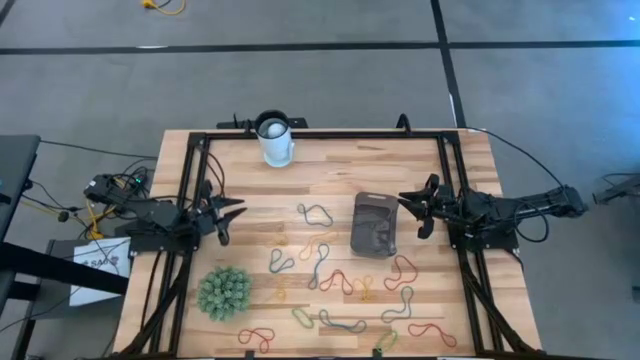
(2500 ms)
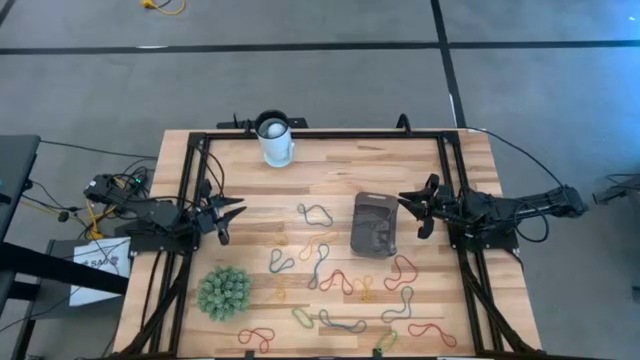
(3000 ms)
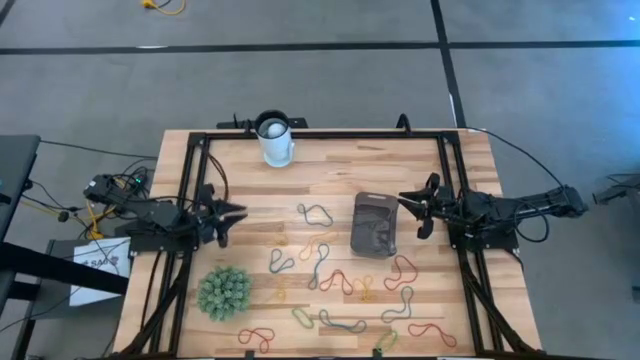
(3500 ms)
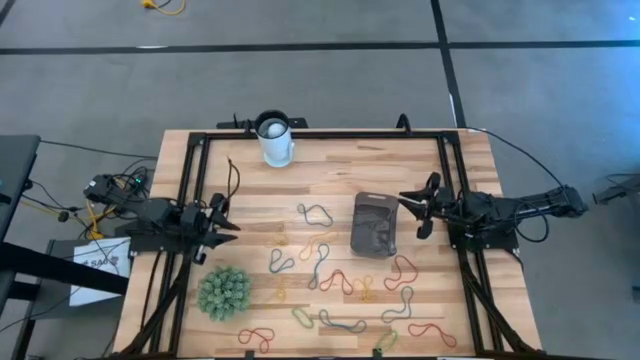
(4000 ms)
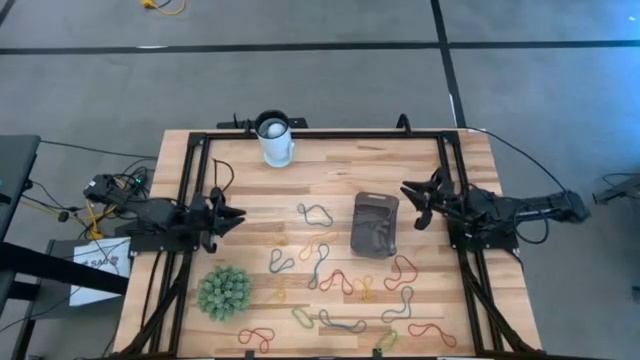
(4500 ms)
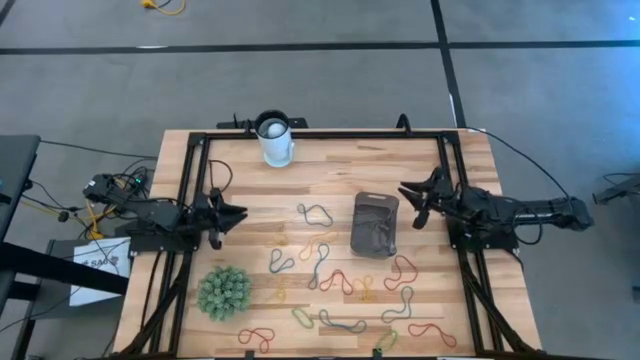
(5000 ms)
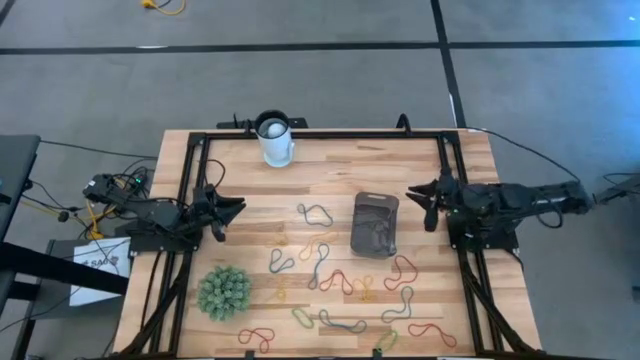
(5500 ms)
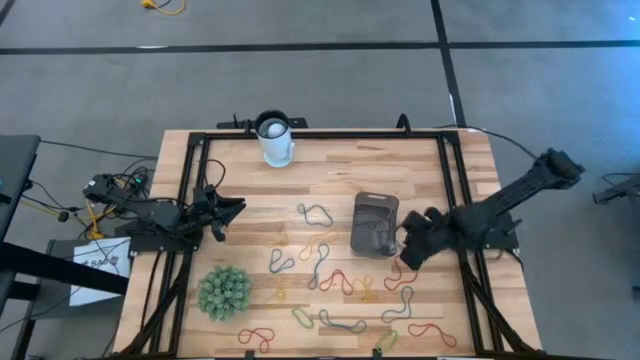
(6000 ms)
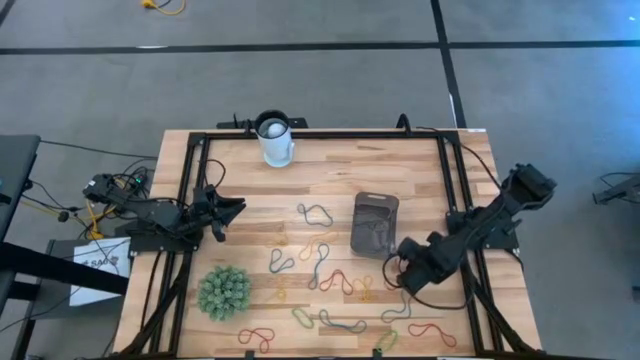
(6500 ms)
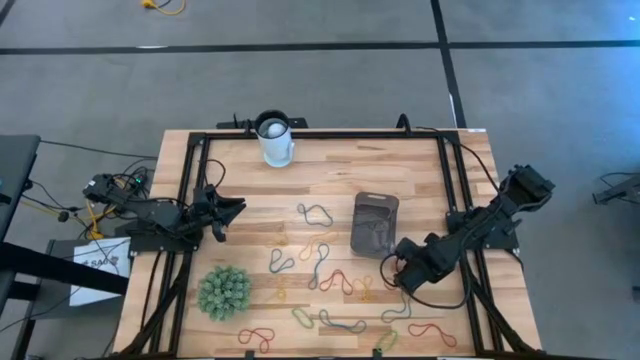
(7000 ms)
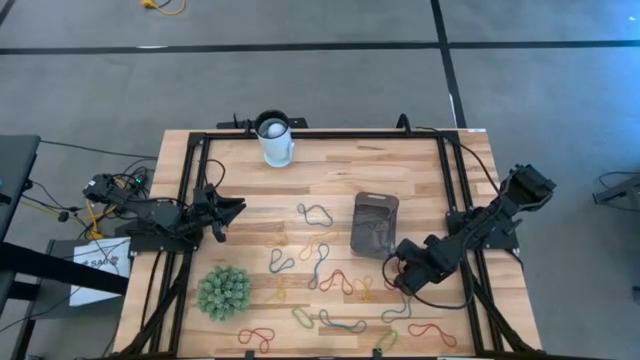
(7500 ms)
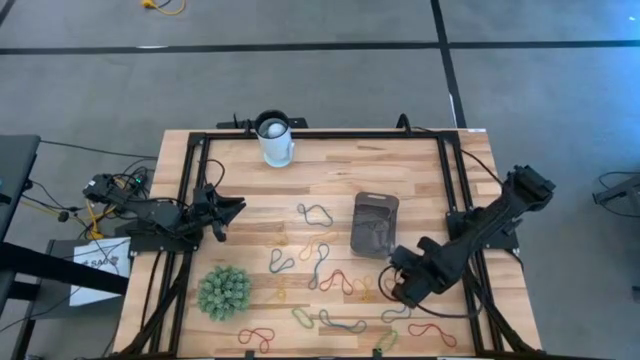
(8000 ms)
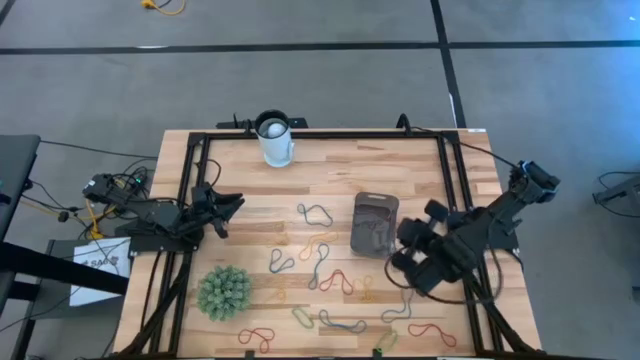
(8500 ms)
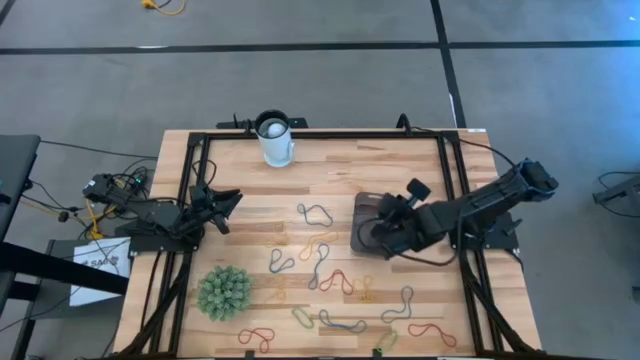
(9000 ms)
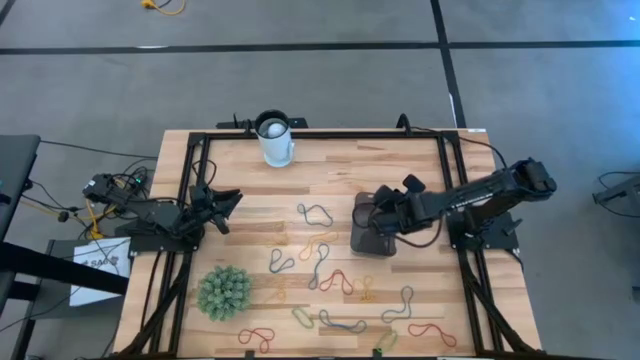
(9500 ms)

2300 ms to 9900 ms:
Task: Pick and place items into bin
Put the red rubber band into the black bin

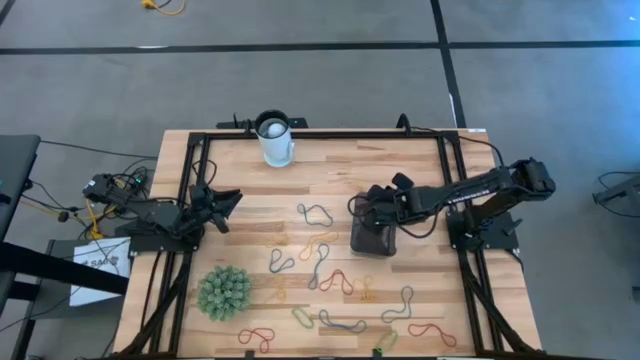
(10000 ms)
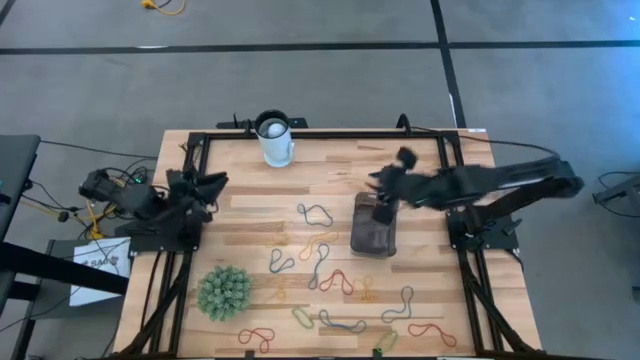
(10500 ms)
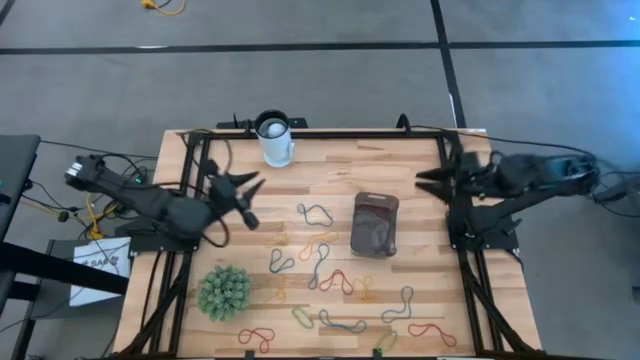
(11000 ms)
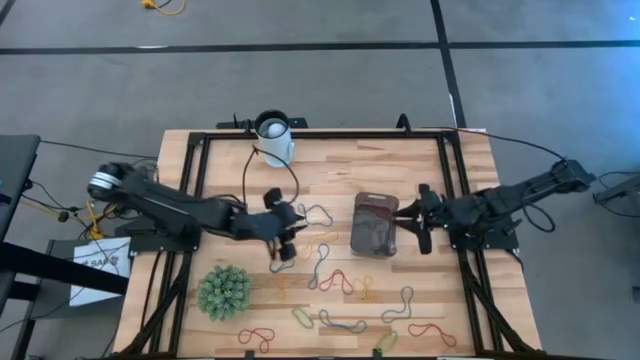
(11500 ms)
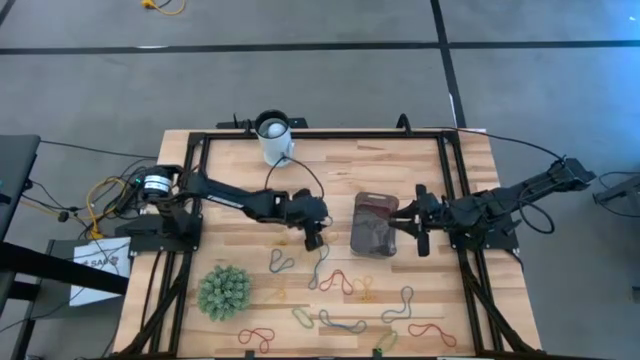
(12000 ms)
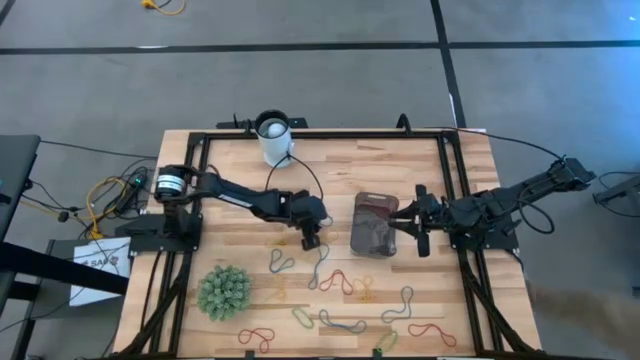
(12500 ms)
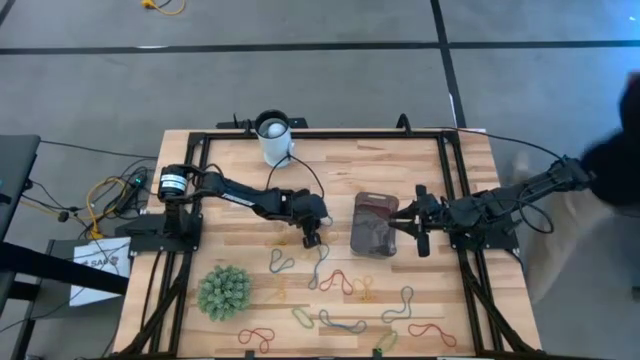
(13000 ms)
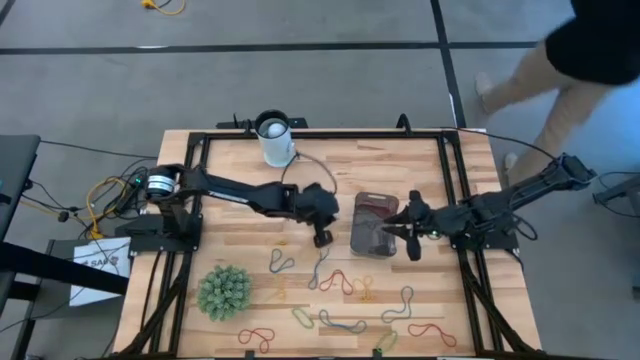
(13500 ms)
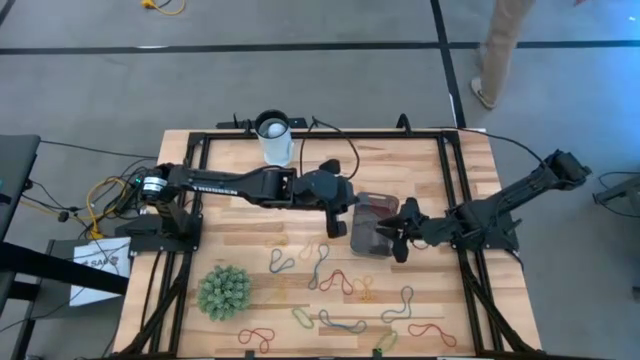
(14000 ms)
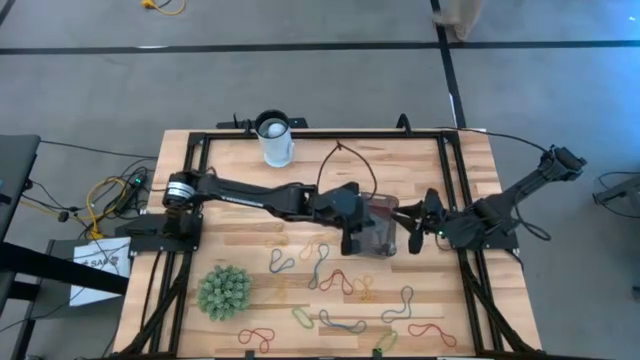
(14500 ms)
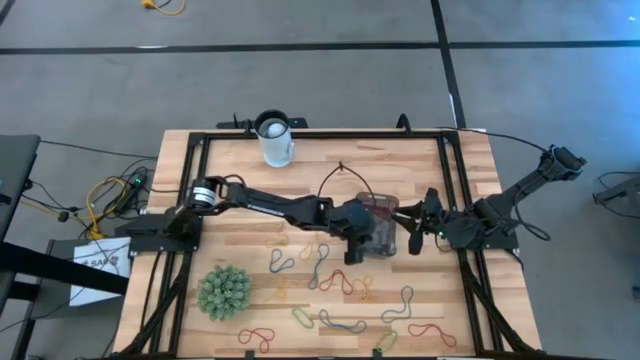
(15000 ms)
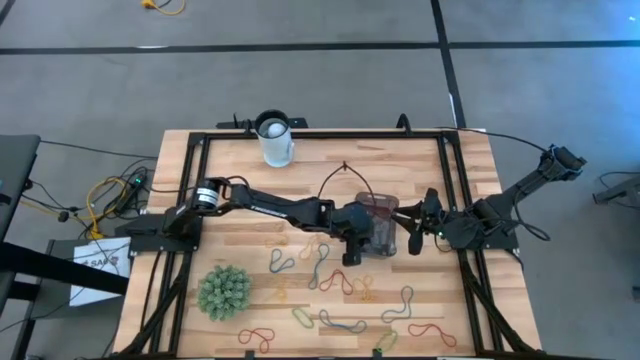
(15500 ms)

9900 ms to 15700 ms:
Put the blue rubber band into the black bin

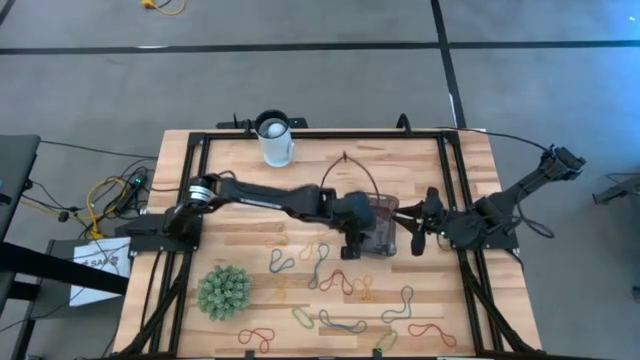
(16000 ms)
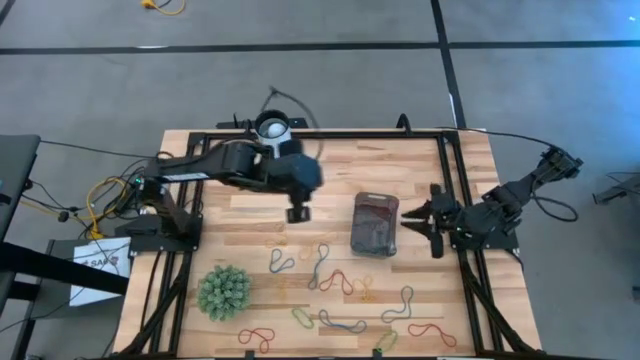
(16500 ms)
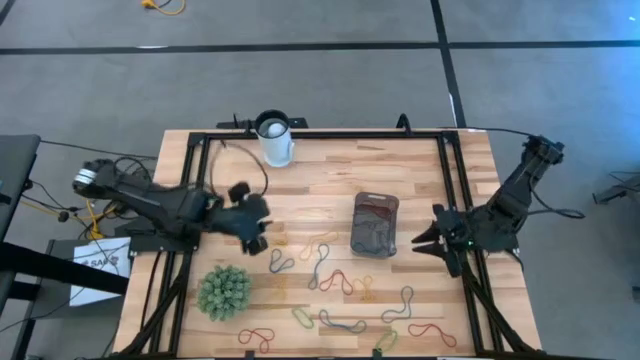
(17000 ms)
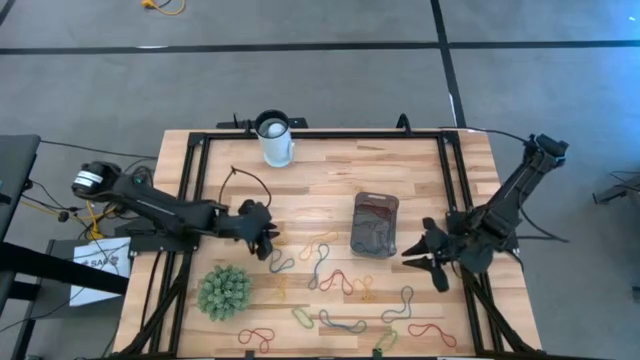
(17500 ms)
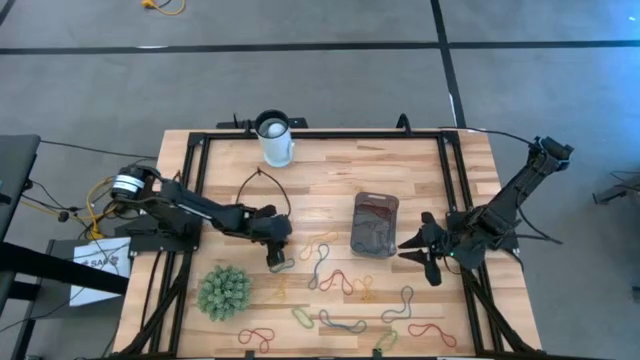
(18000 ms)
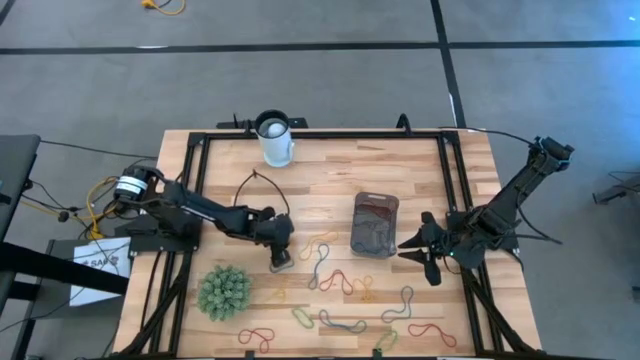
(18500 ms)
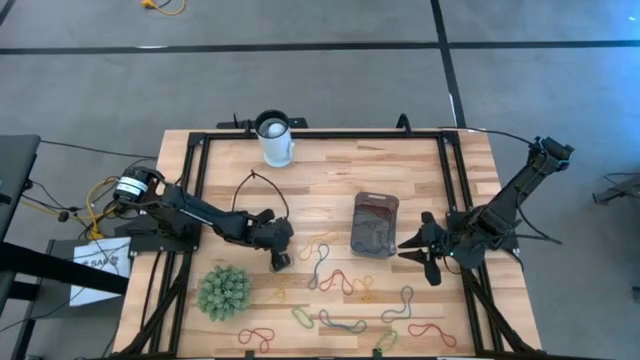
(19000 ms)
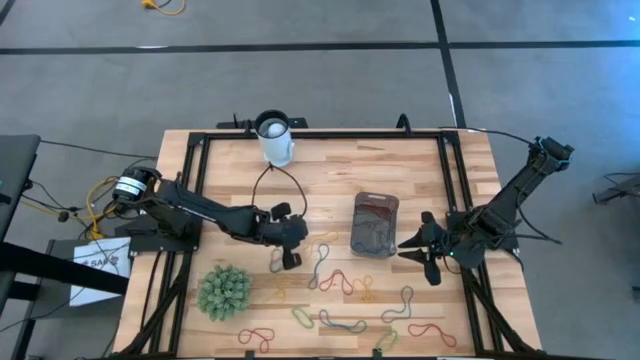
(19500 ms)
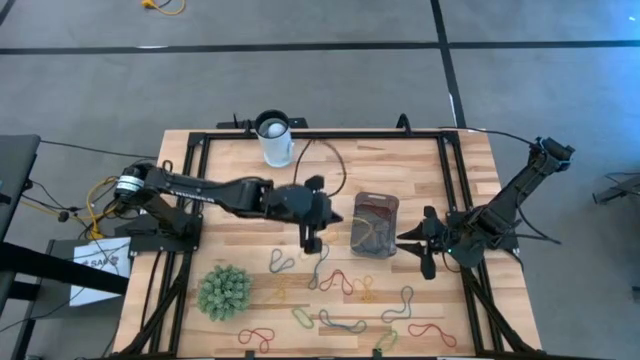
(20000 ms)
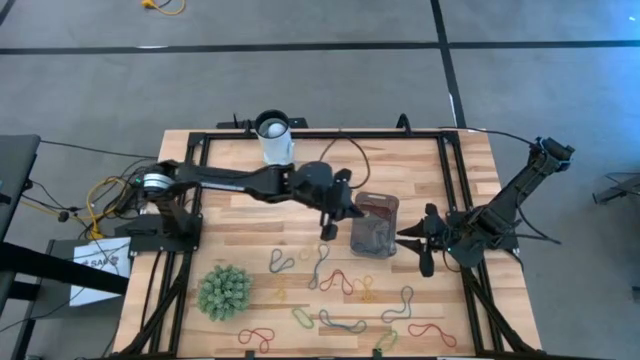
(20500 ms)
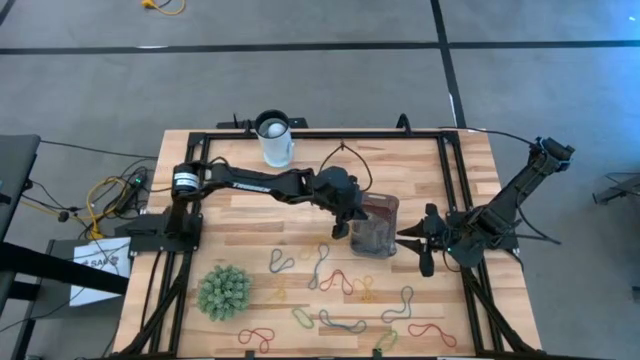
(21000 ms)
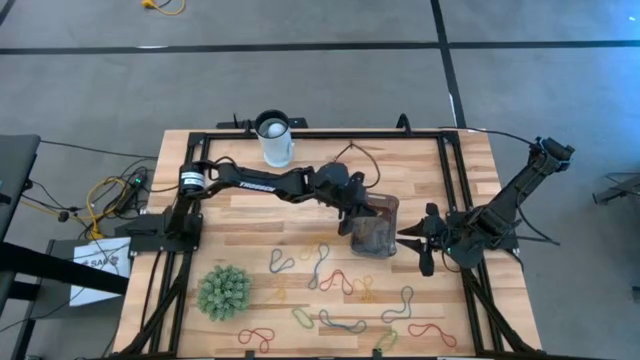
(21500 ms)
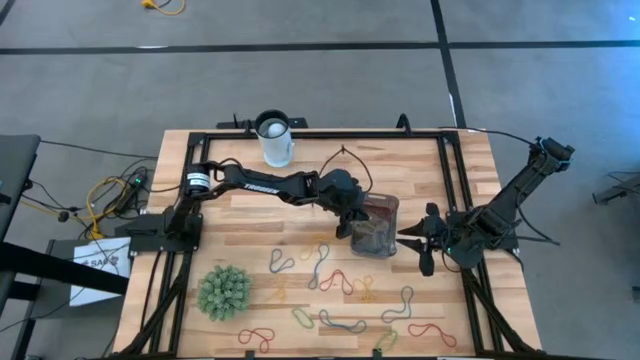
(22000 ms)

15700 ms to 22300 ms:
Put the yellow rubber band into the black bin

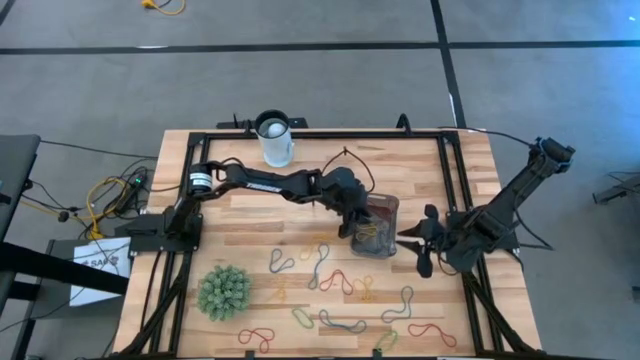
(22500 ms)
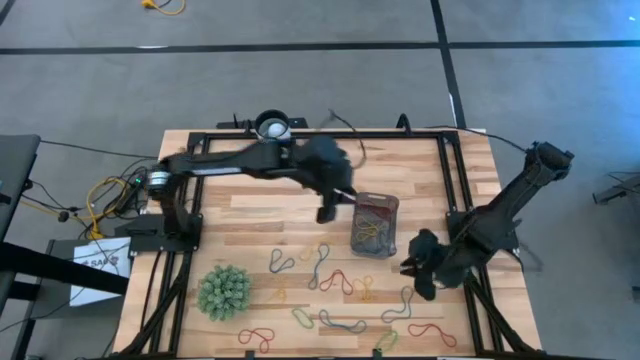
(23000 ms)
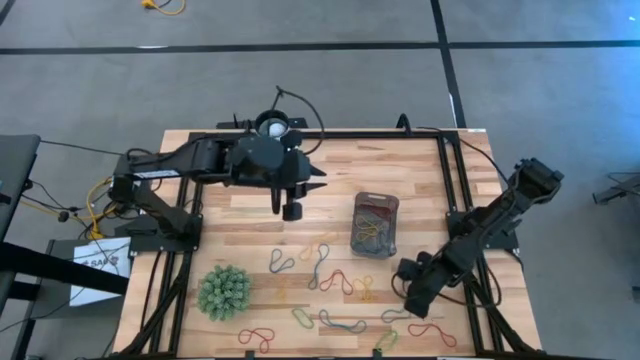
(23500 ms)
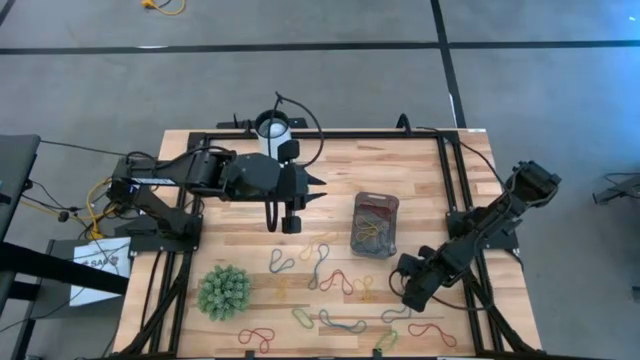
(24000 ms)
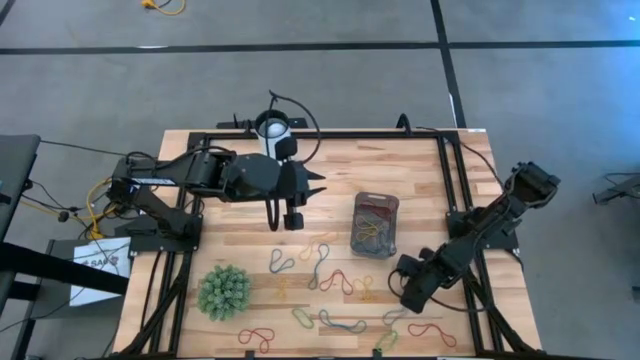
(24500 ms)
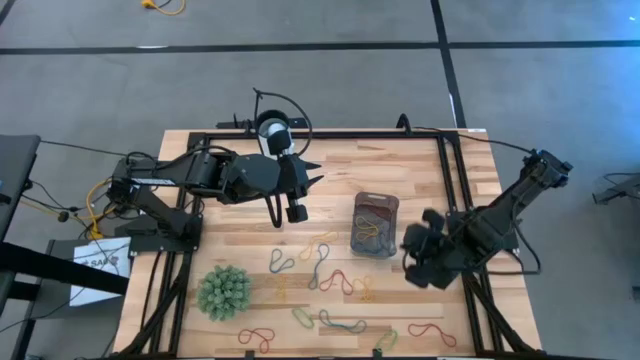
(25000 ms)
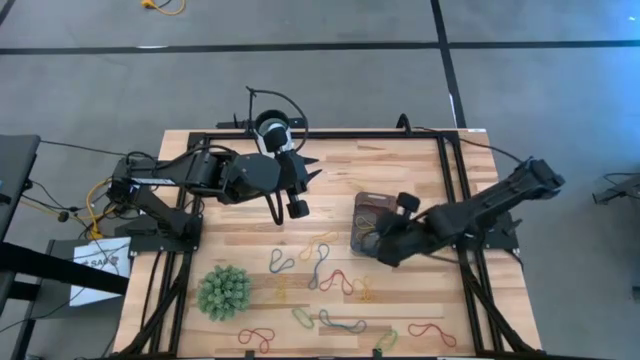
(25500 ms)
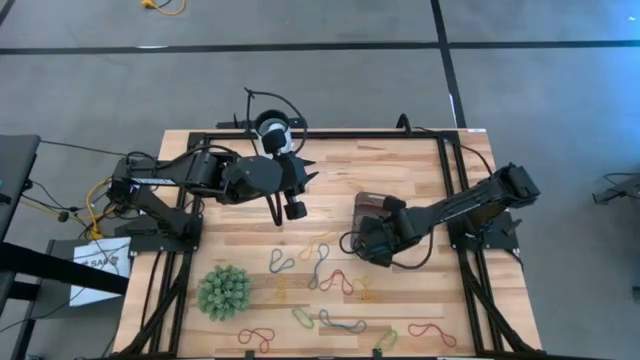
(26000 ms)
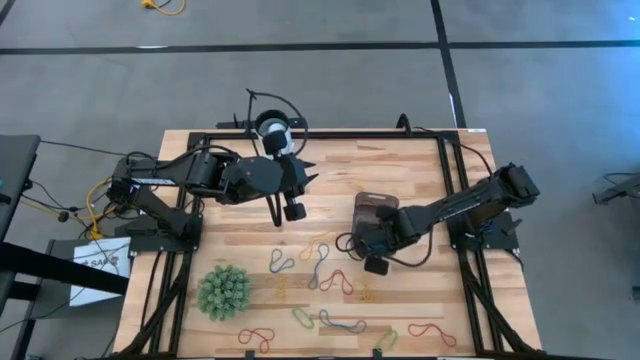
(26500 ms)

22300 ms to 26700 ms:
Put the blue rubber band into the black bin
